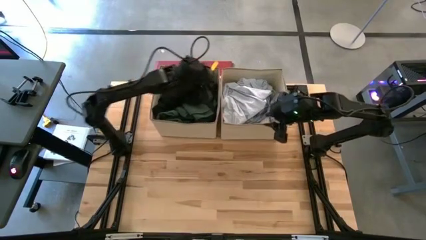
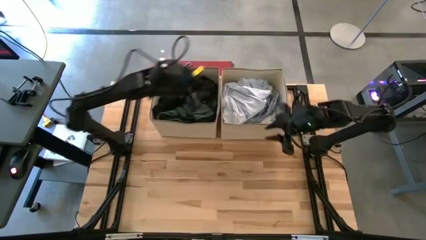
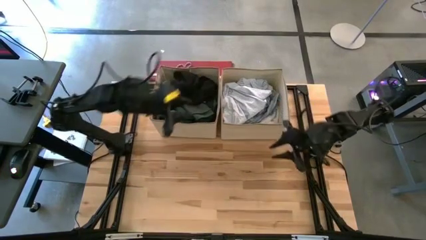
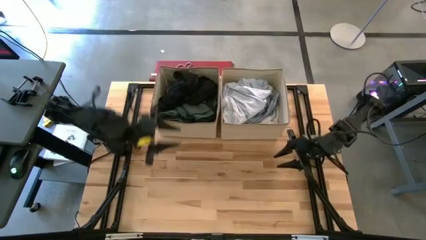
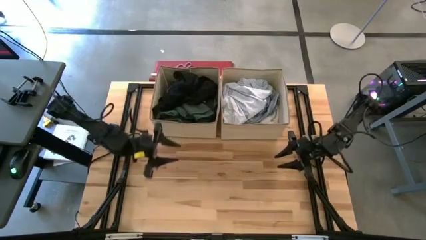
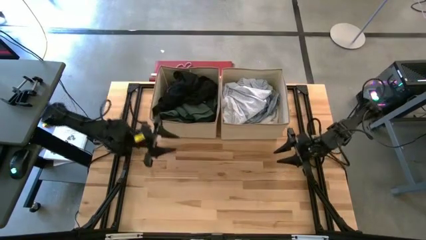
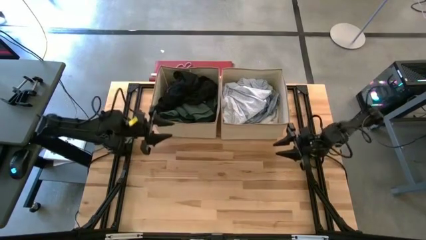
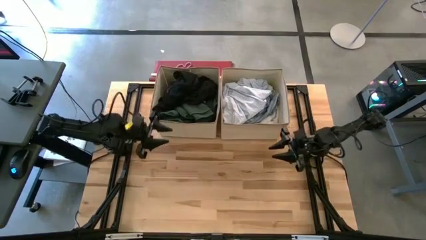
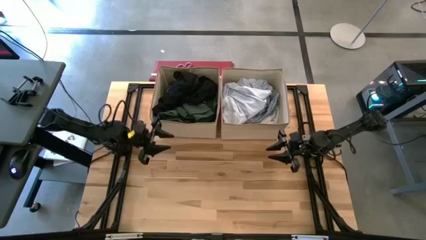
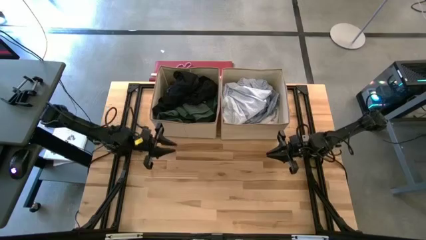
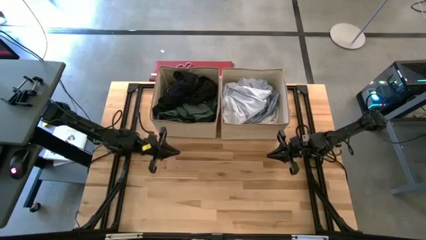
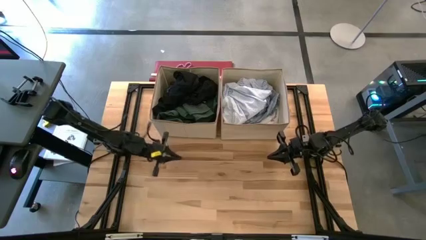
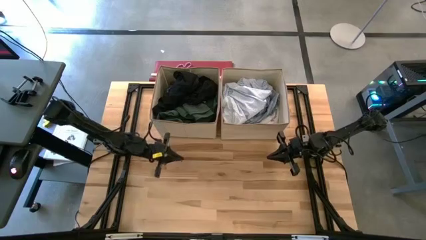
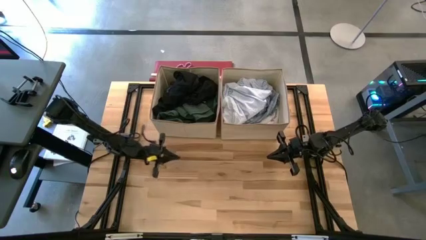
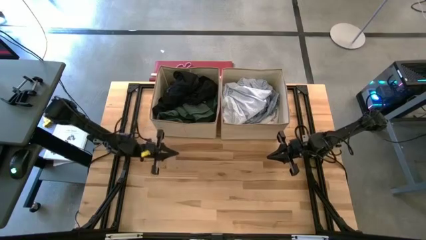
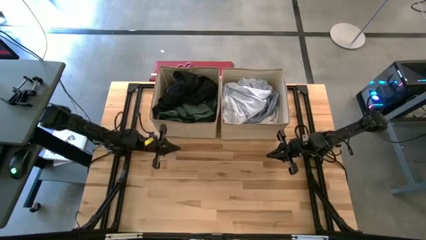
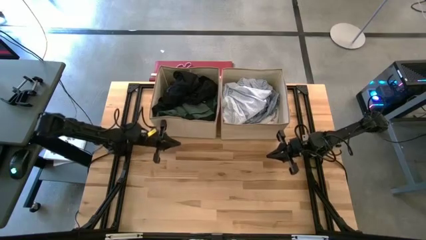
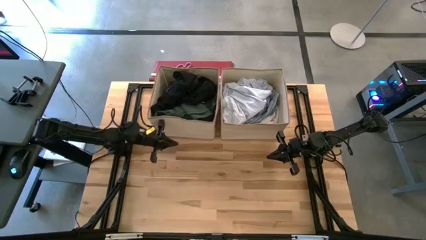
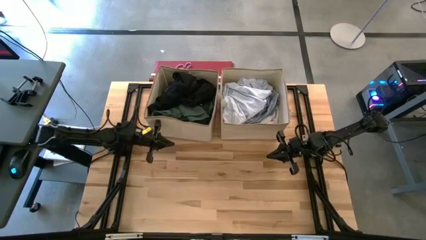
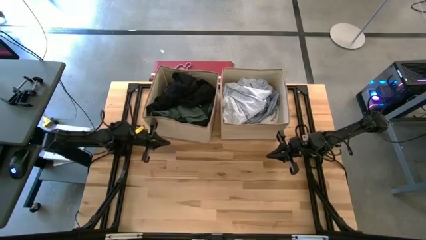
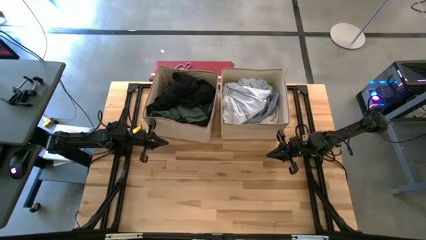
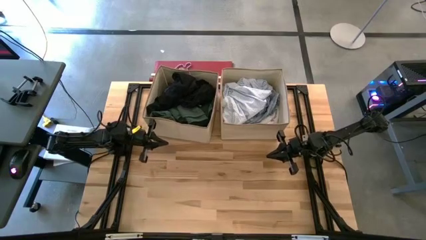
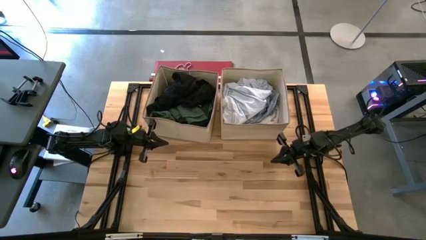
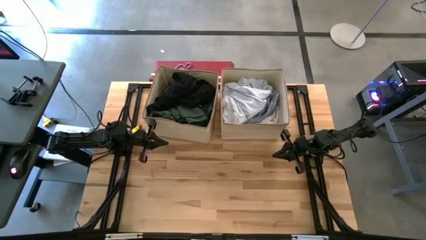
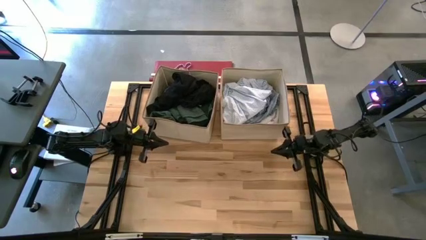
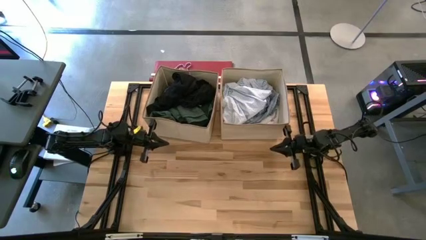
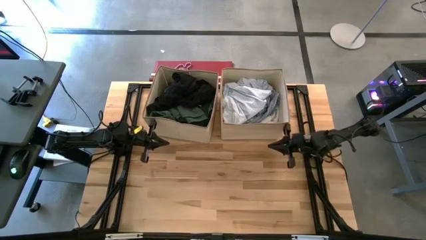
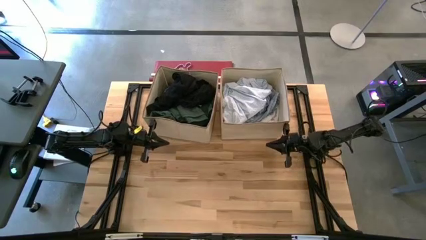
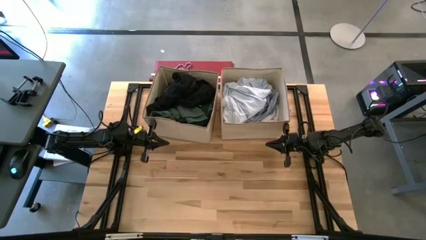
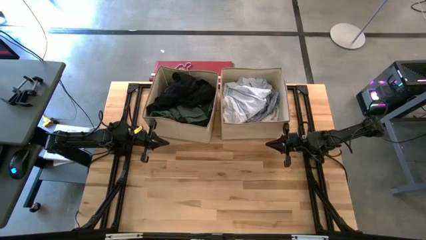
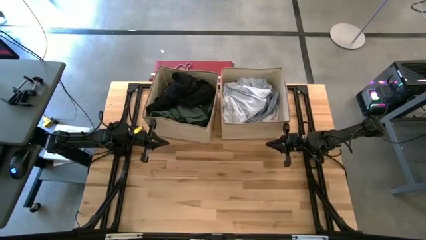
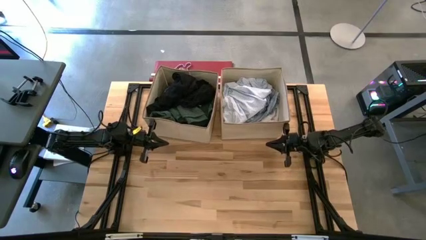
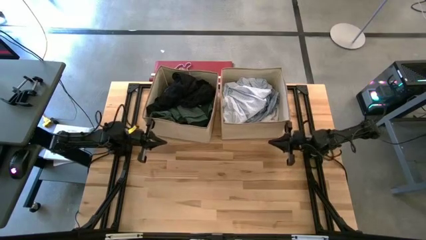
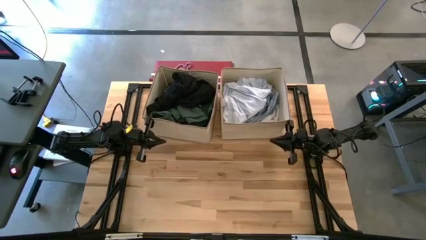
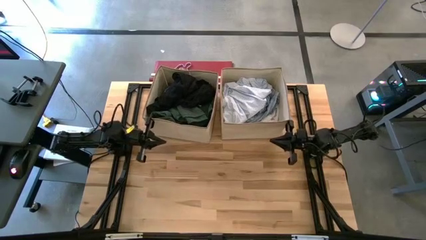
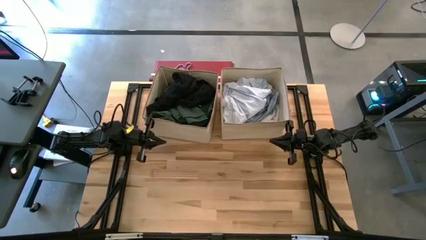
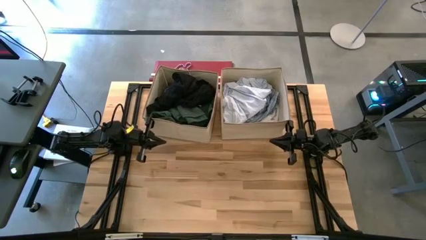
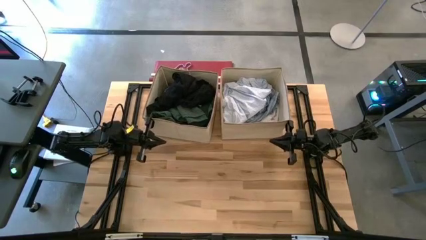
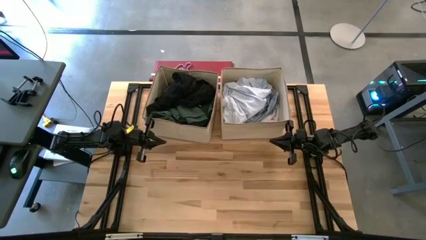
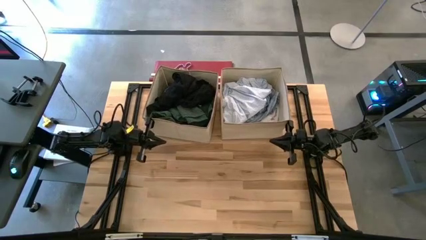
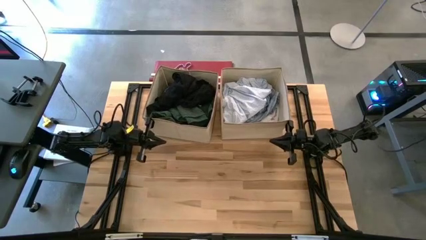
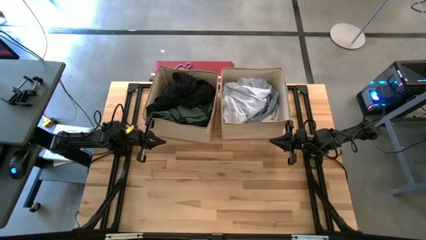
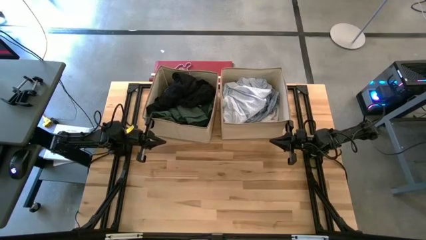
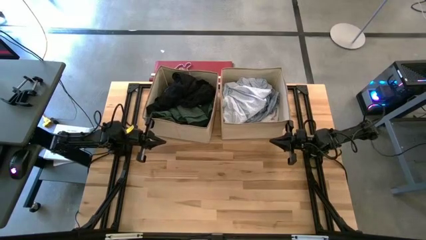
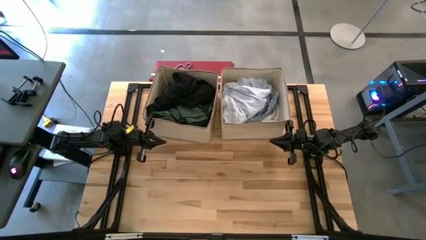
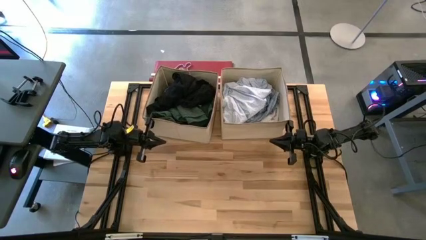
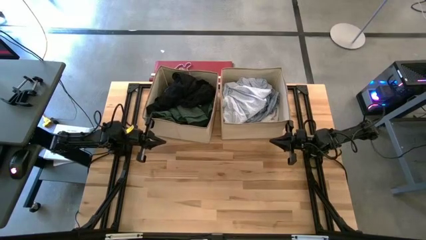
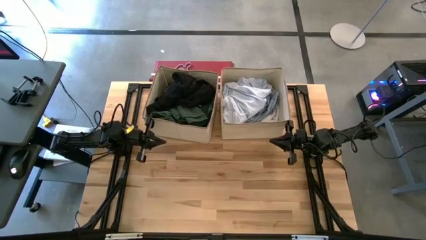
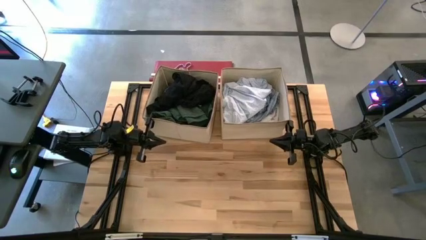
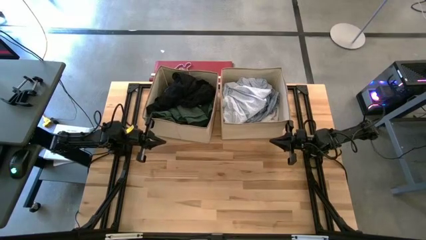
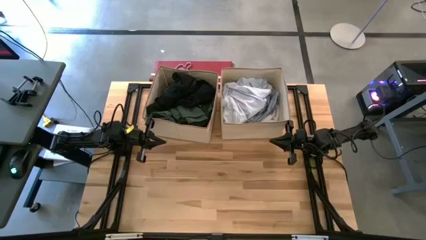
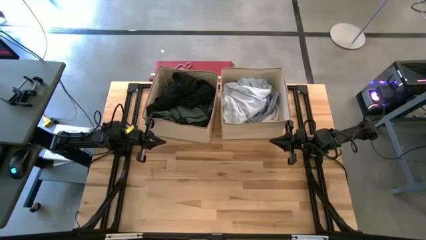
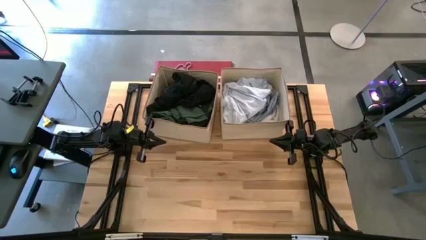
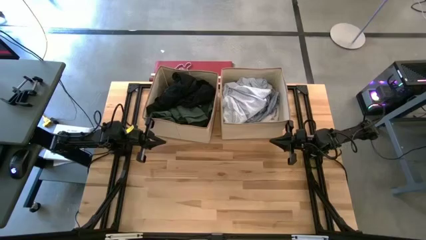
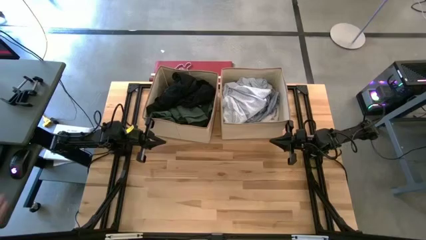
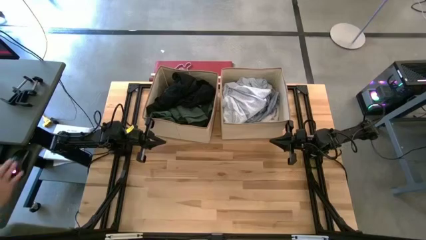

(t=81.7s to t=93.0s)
Task: Sort clothes
Return to Home Position
